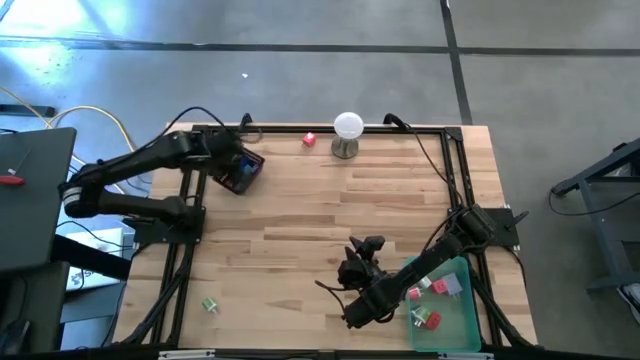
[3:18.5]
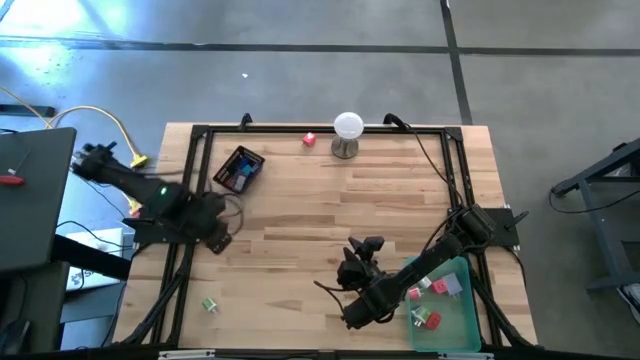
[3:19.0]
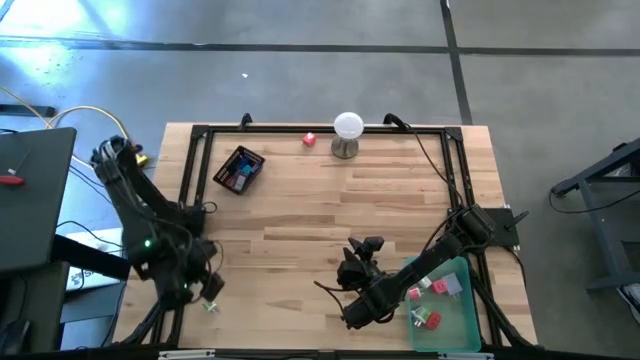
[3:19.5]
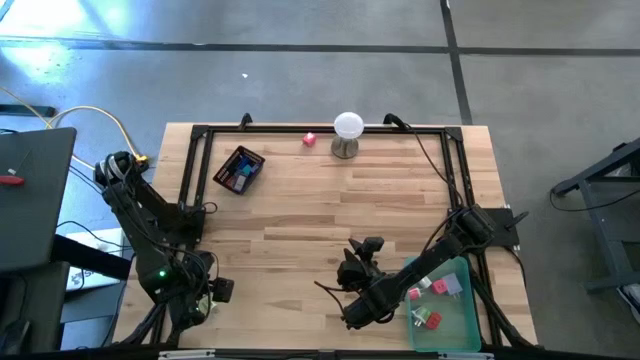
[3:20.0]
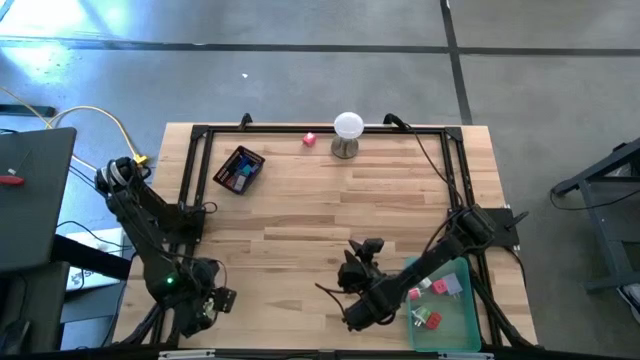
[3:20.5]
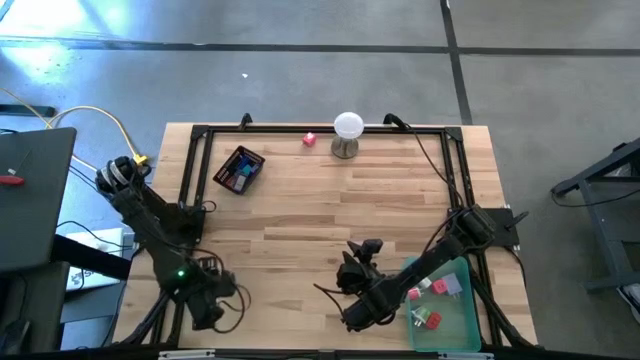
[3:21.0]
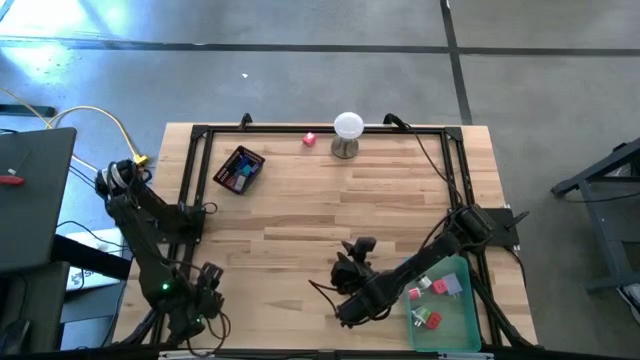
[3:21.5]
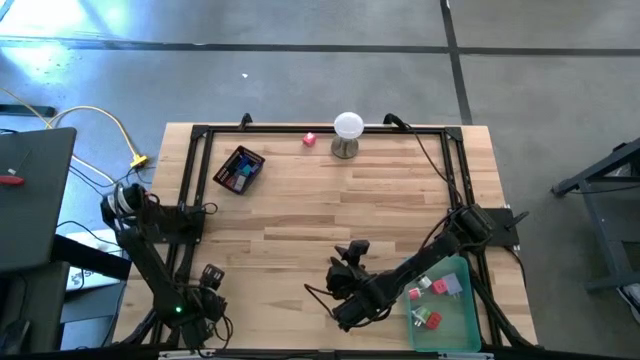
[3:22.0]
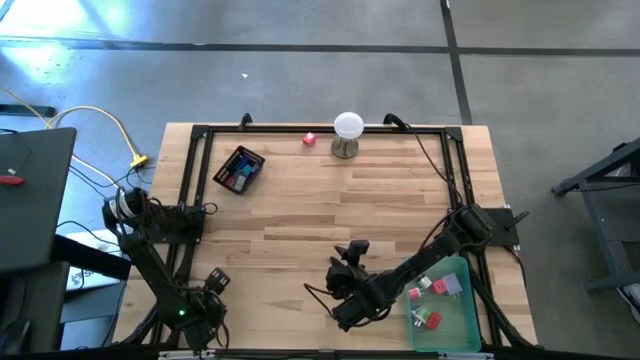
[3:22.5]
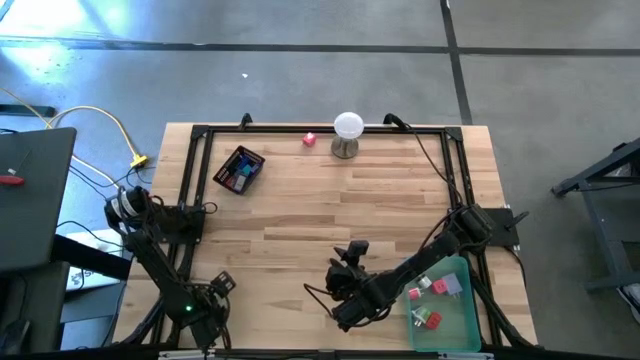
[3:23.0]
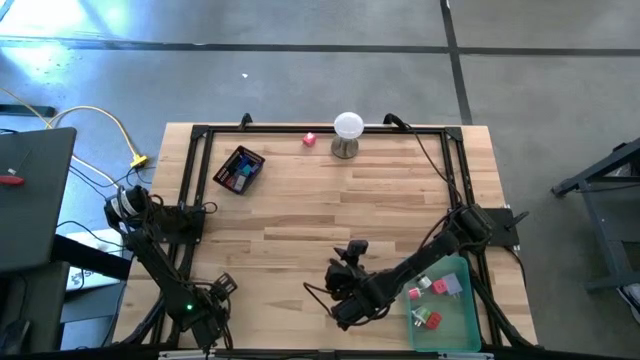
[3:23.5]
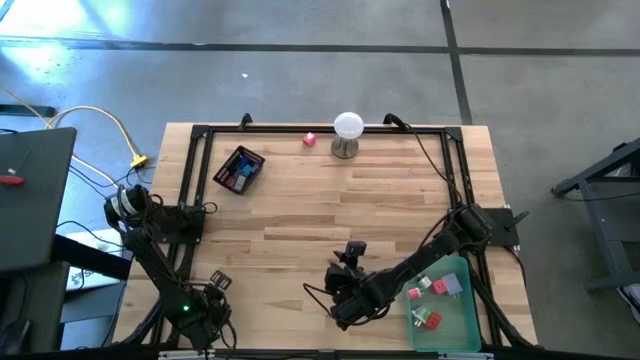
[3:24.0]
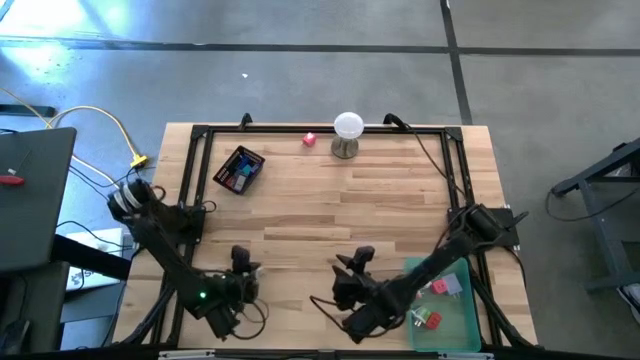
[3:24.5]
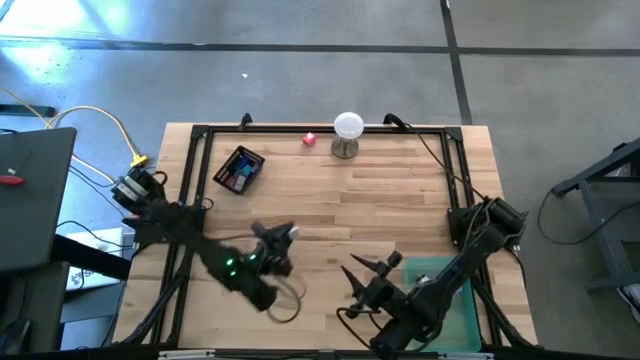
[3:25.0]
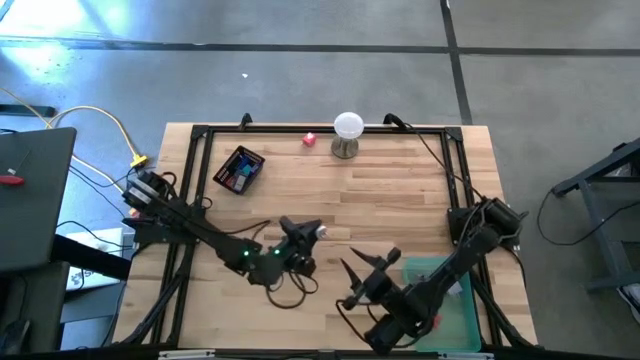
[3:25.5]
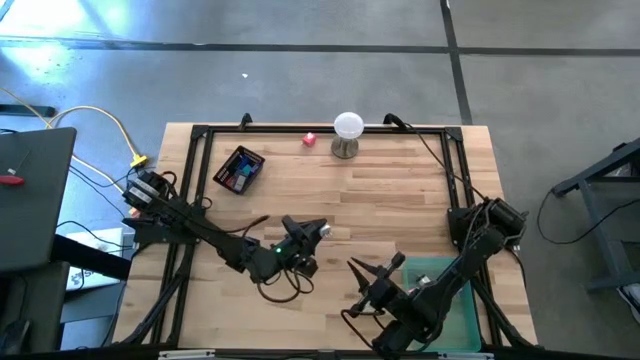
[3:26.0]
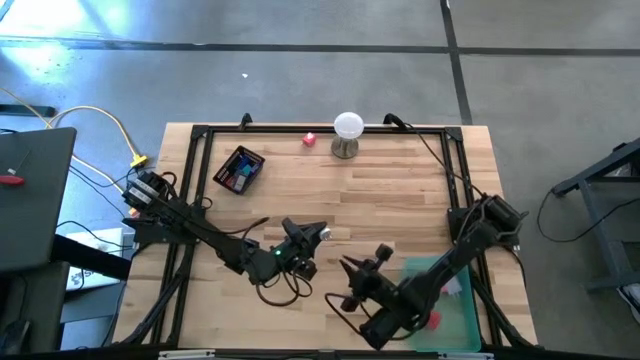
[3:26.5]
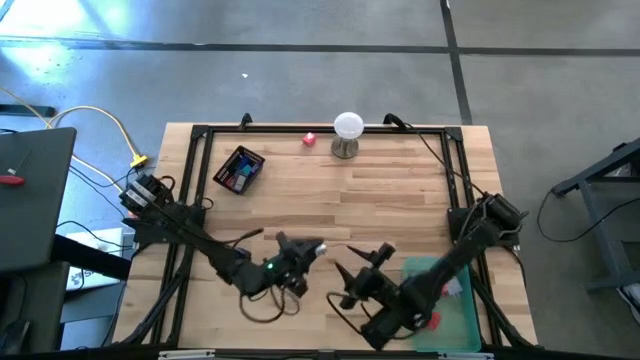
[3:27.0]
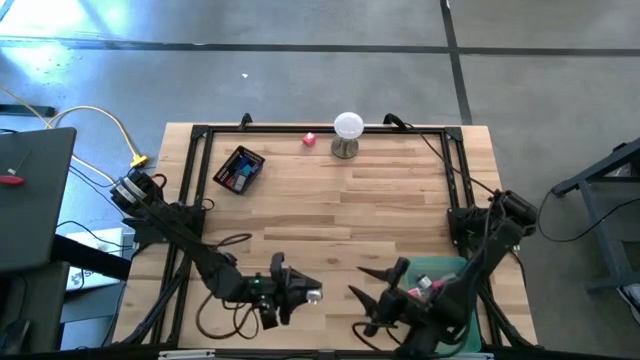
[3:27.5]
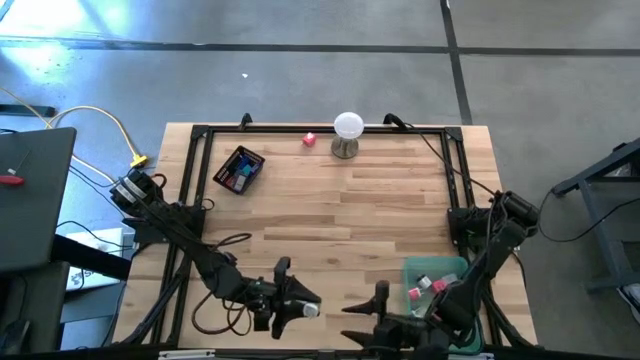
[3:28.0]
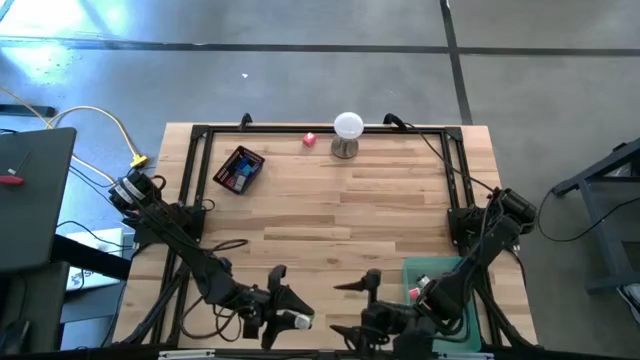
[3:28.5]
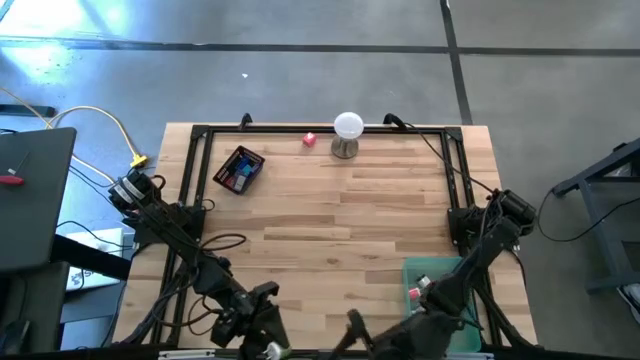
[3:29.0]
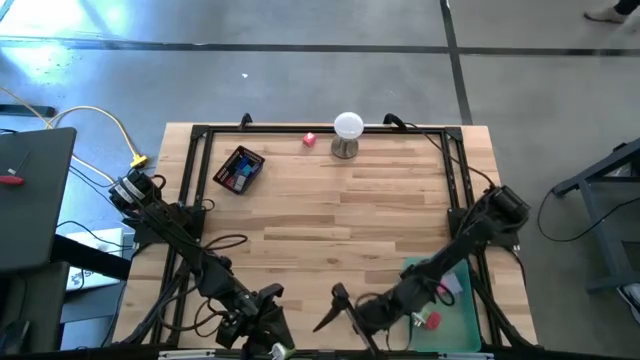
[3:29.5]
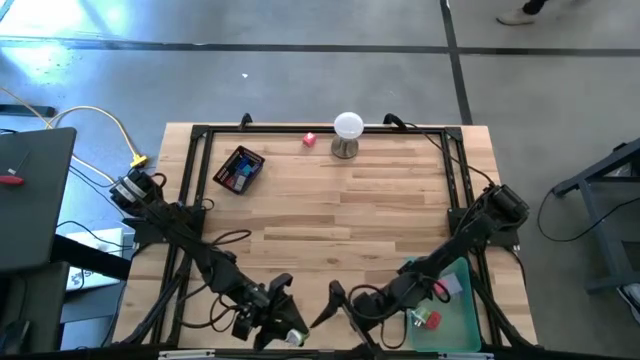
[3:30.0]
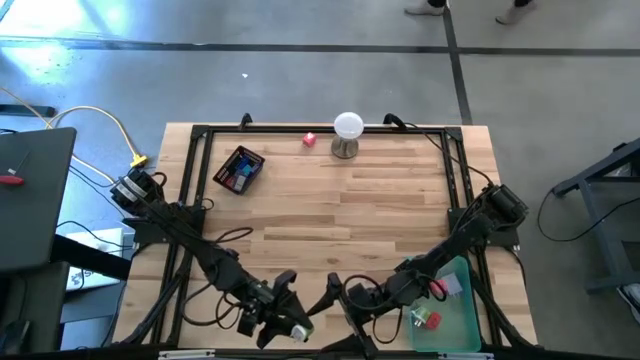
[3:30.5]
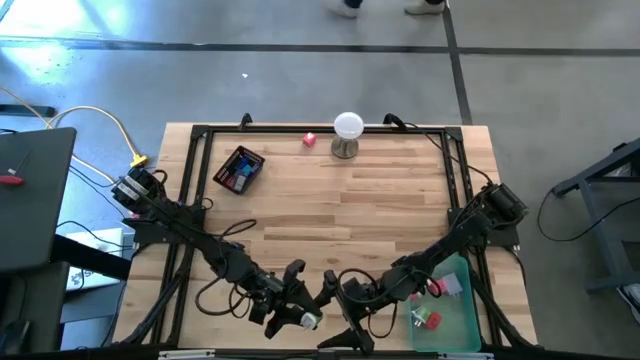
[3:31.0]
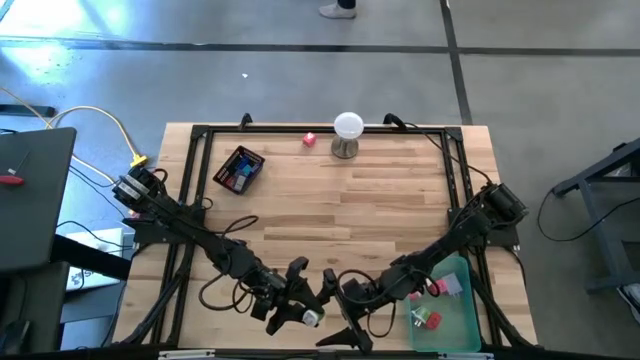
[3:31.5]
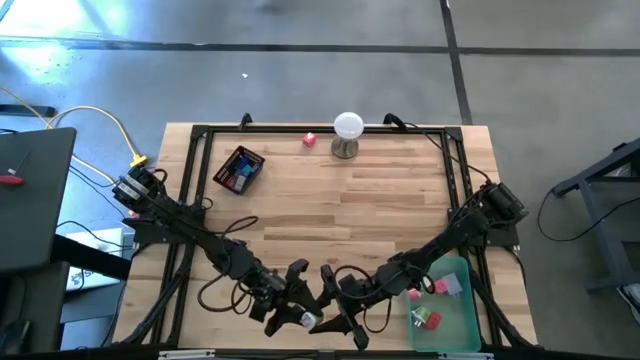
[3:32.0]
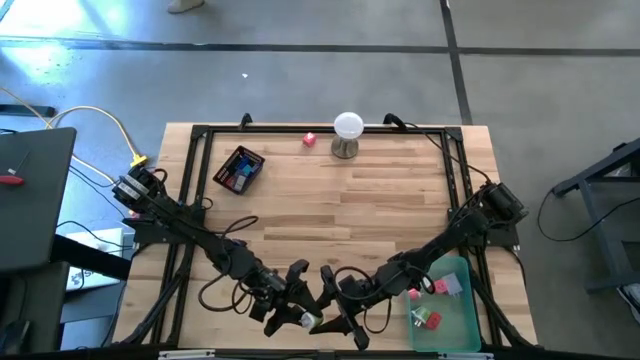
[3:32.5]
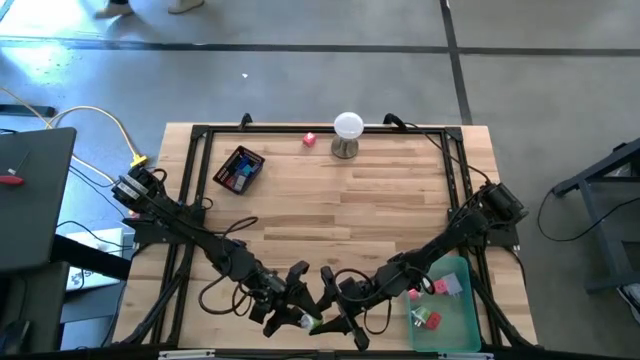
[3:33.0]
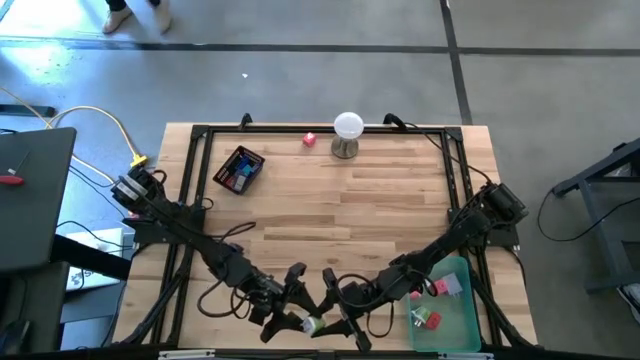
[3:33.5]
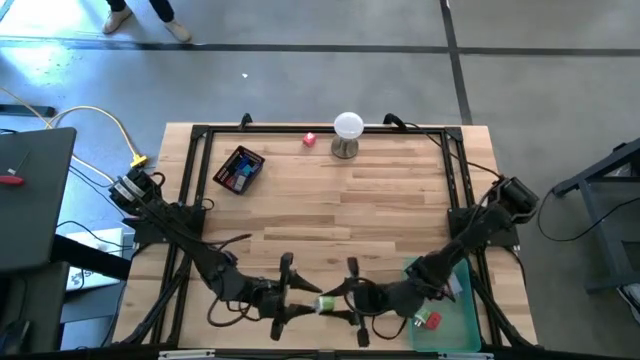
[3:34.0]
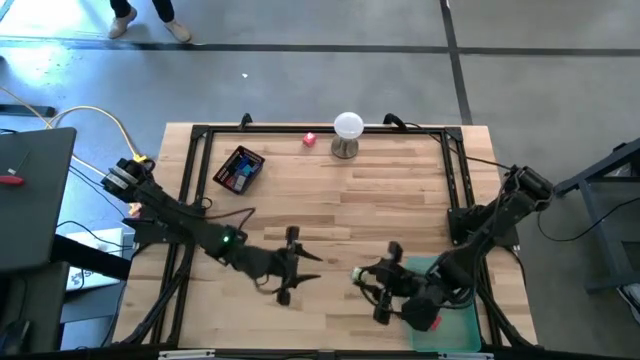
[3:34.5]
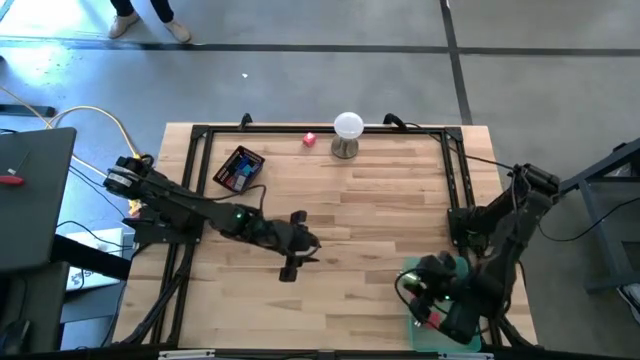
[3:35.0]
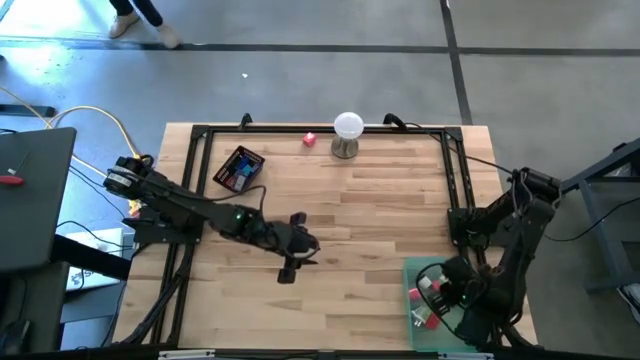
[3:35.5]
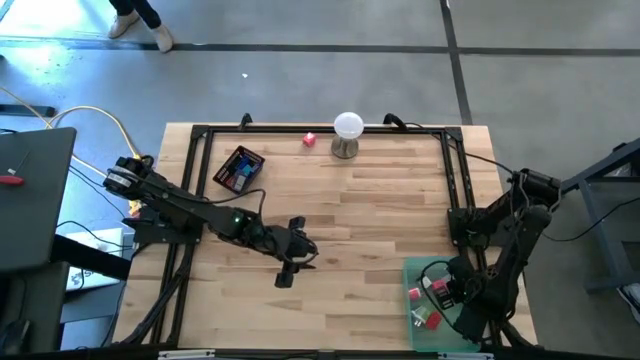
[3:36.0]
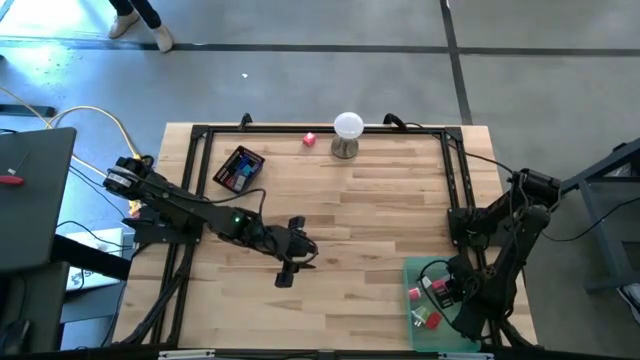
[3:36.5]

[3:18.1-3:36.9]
Task: Pick & Place Office items
Put the green charger adapter into the green bin

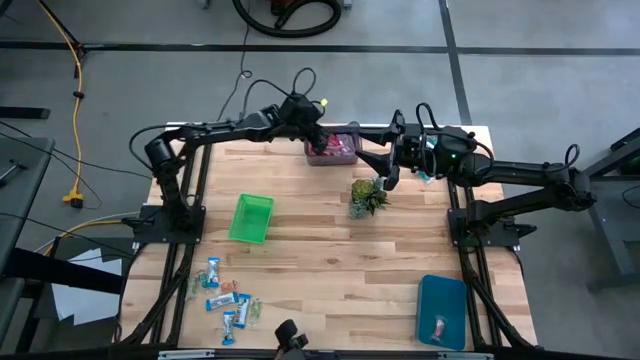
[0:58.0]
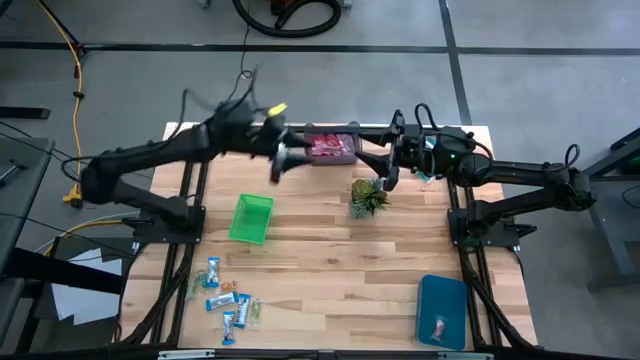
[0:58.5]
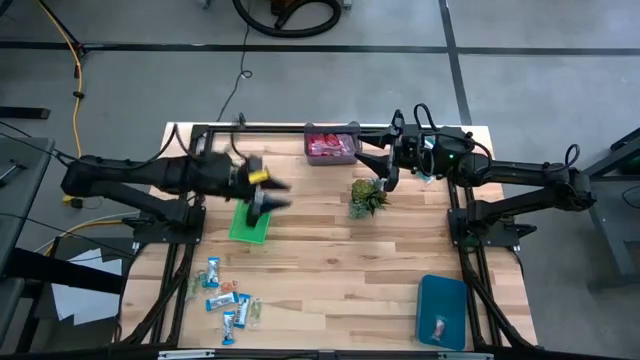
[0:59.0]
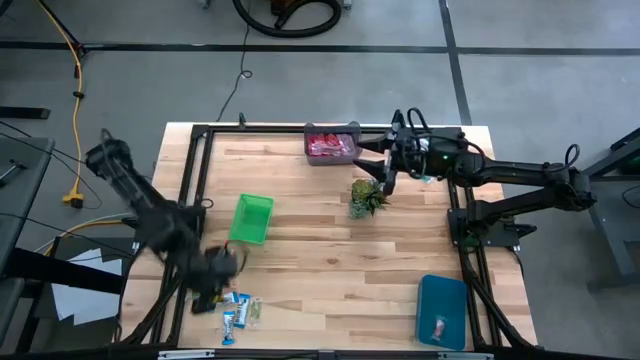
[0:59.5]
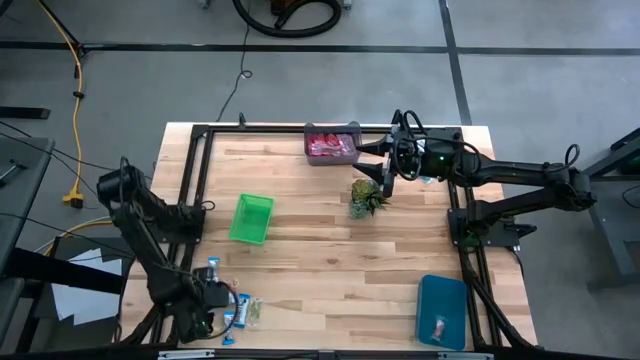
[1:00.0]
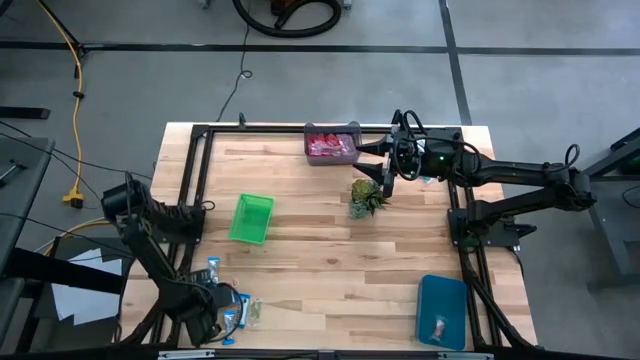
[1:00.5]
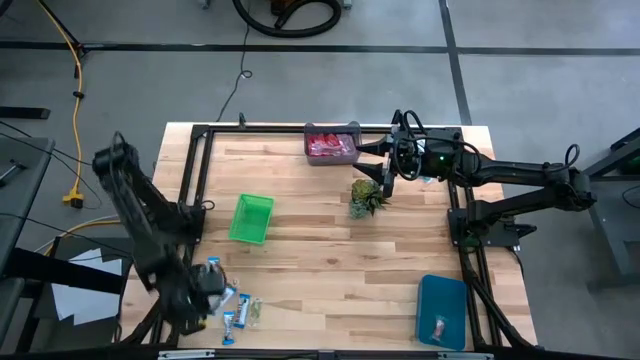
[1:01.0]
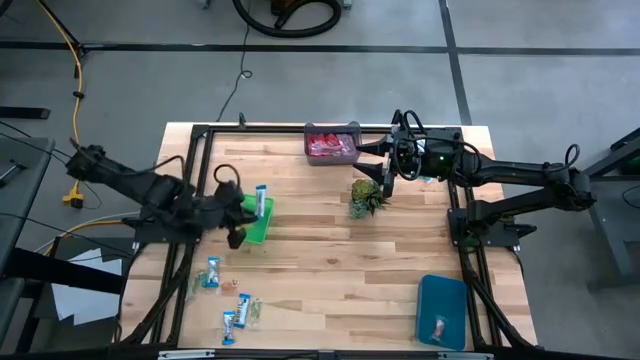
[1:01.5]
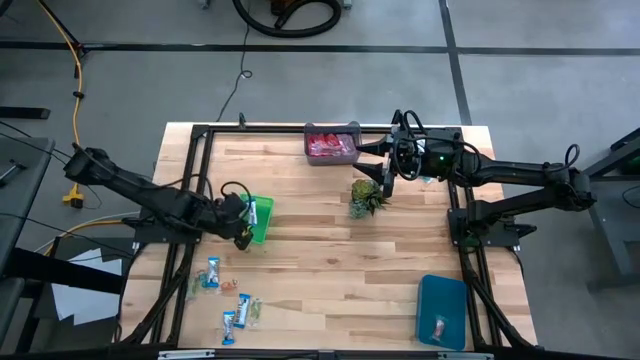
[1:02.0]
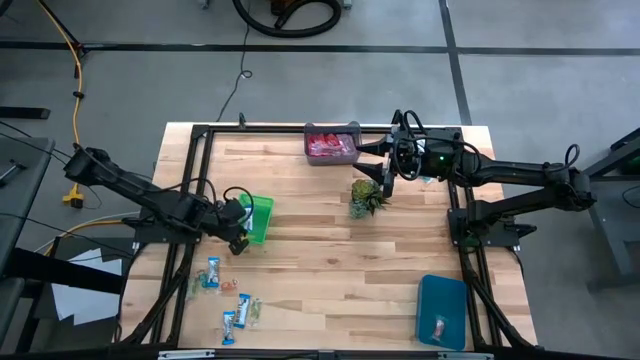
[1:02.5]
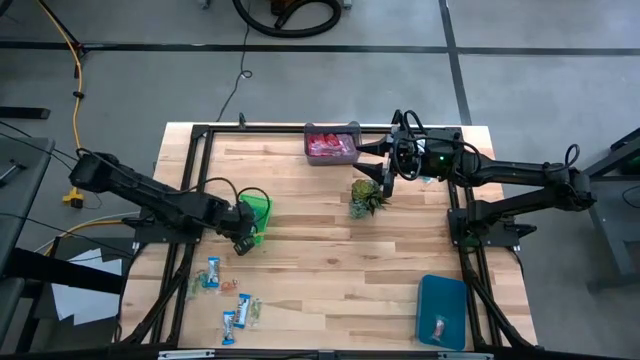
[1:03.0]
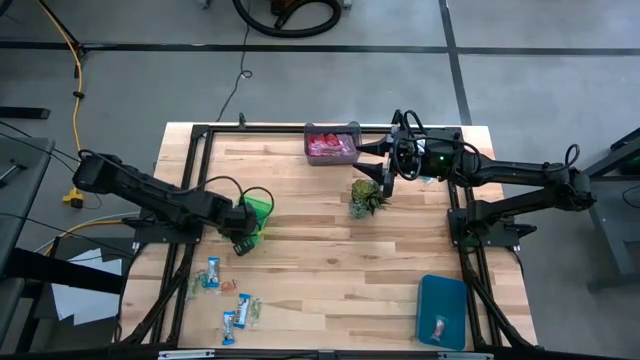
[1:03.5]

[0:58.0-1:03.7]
Task: Sort candy
Put the white candy into the green bin
